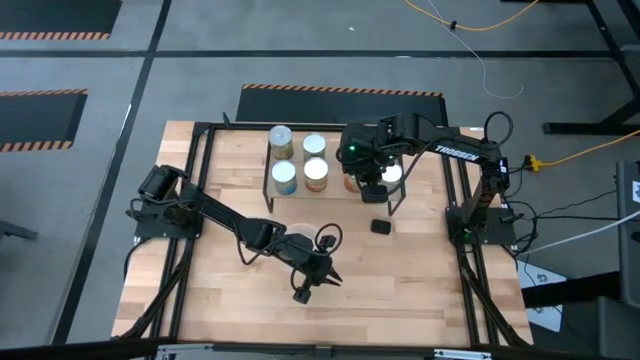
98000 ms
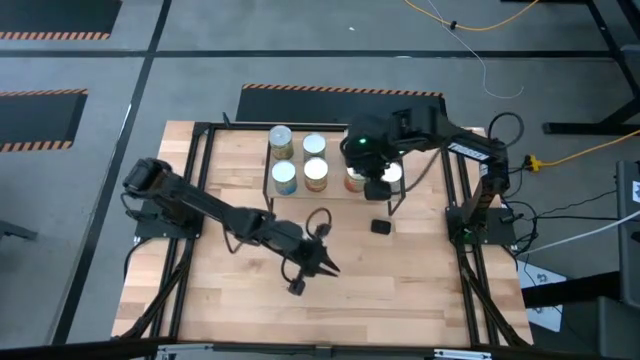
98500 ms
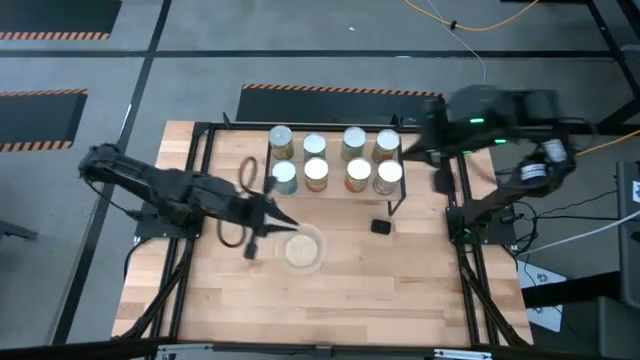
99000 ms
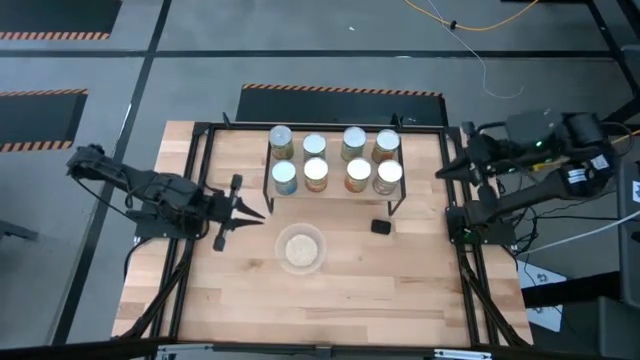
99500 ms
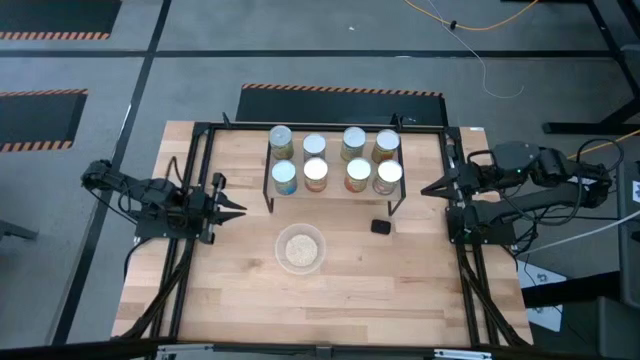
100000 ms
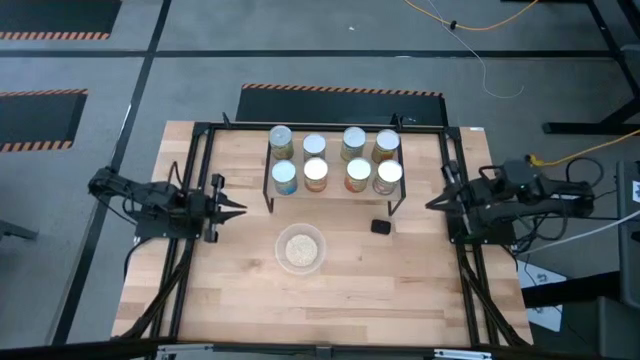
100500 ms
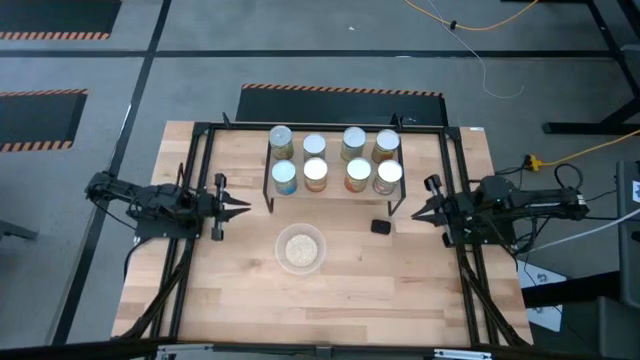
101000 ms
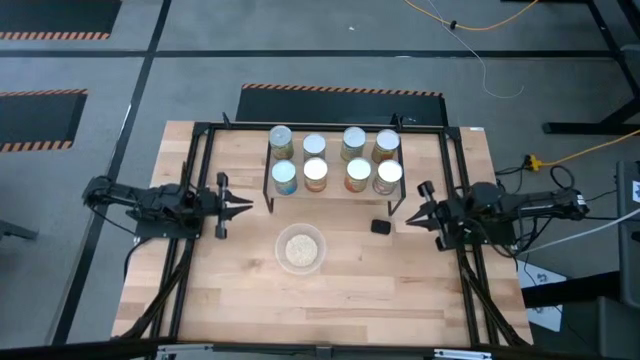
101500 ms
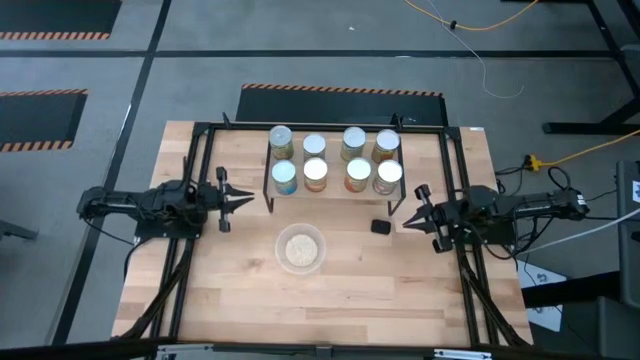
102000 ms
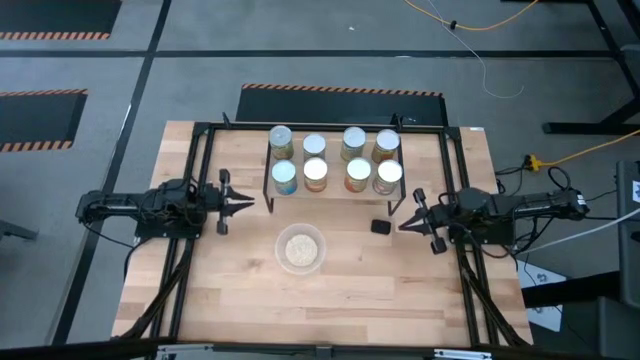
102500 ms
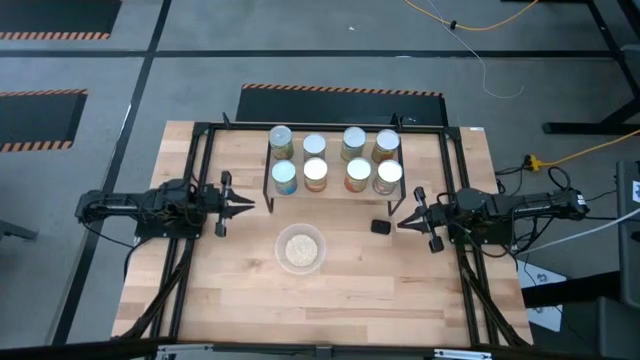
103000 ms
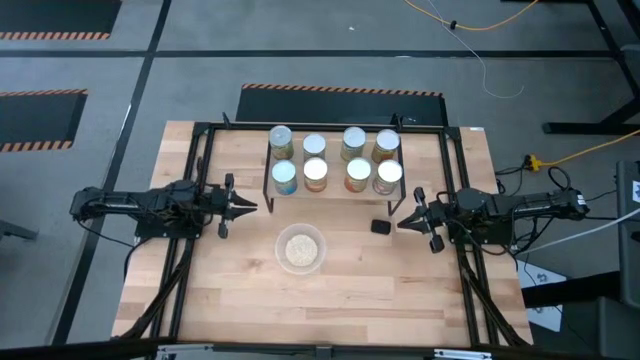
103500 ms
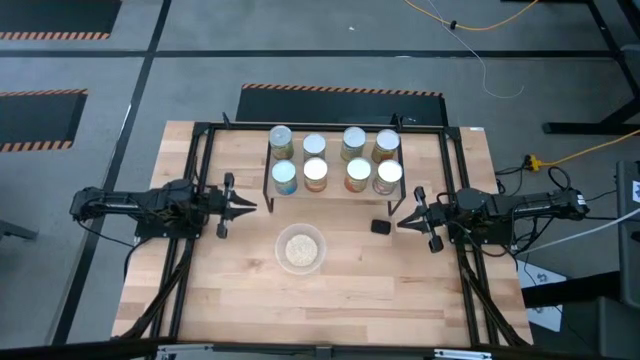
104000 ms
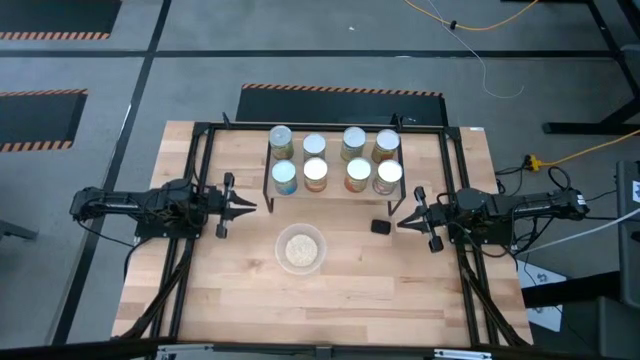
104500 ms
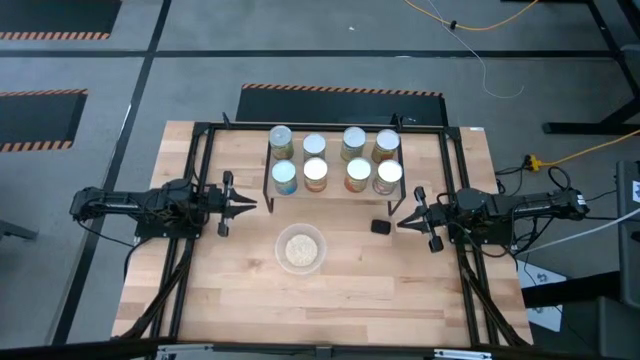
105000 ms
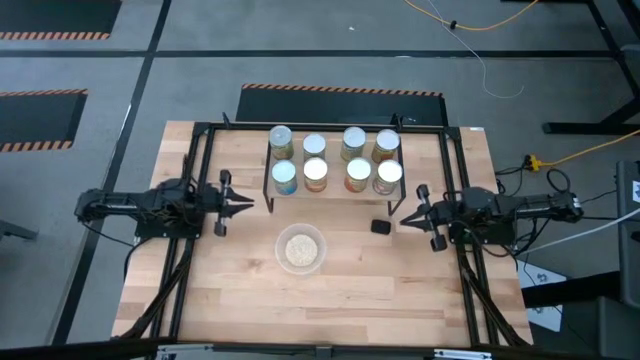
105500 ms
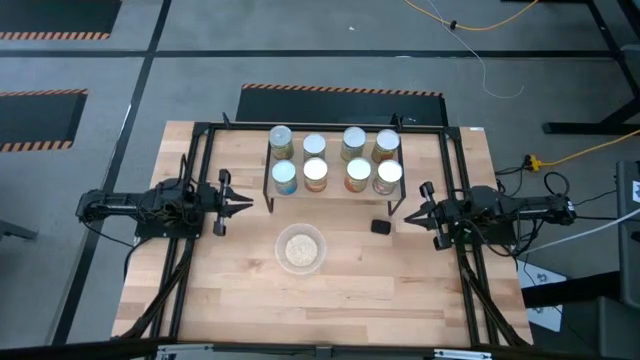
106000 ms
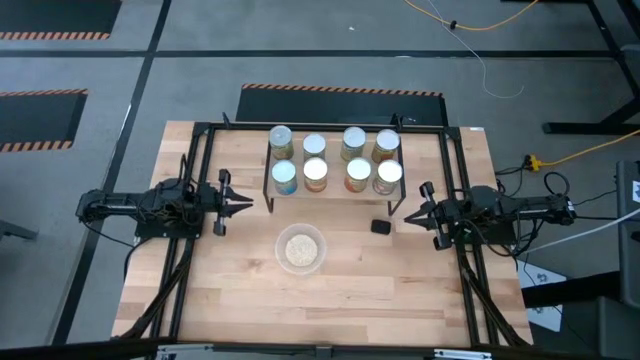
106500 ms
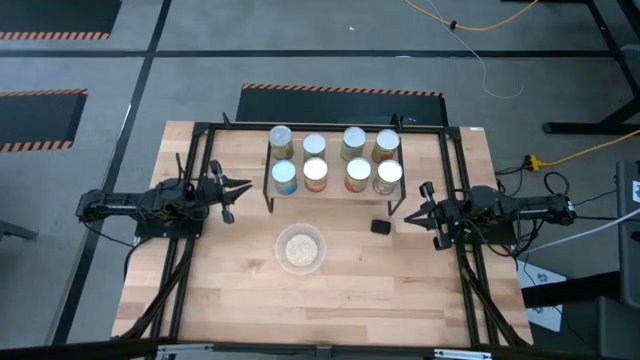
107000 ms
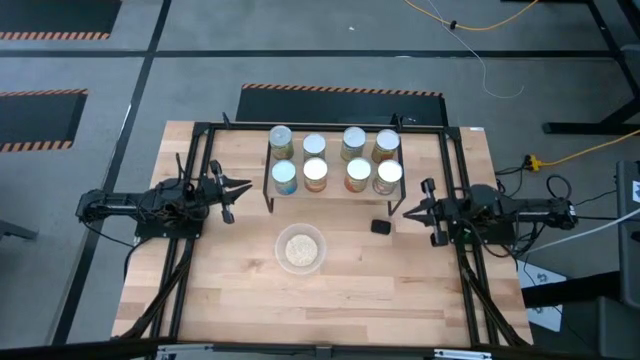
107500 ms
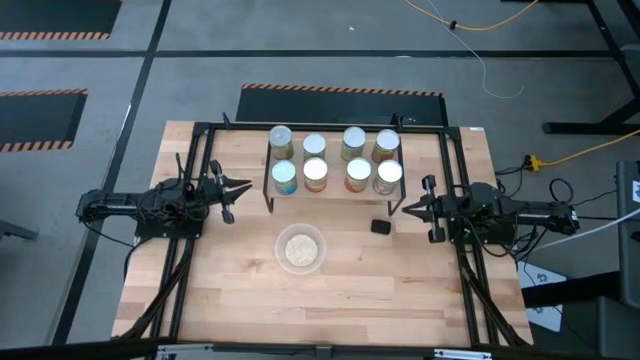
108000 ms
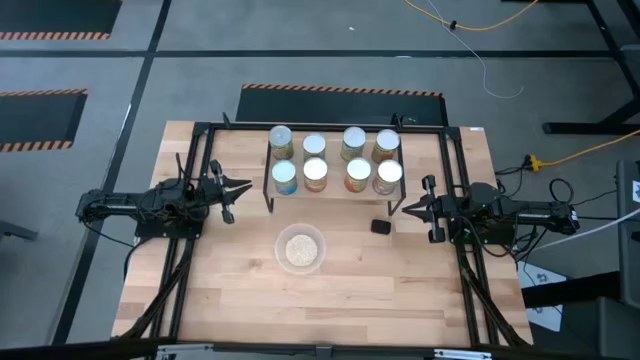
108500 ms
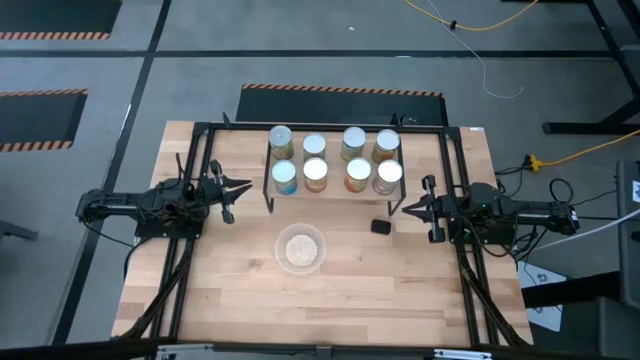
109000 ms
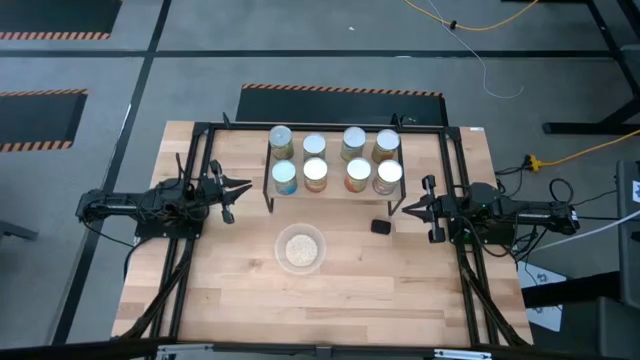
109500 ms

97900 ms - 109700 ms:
Task: Pick and place cans onto a shelf
Return to Home Position

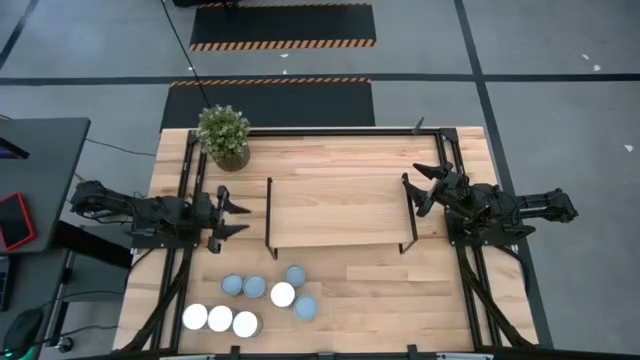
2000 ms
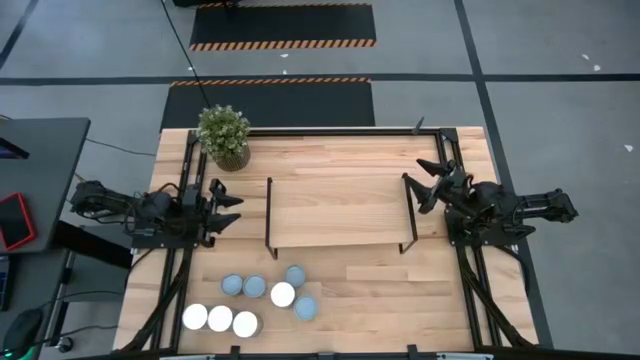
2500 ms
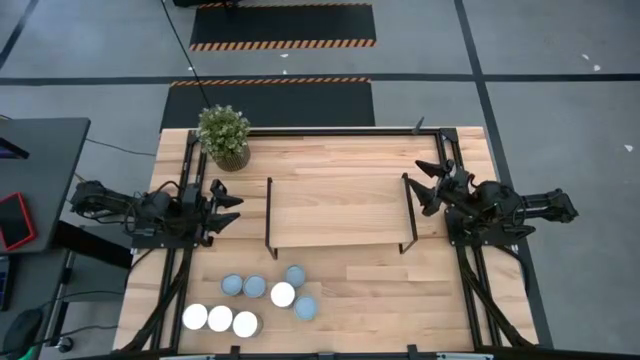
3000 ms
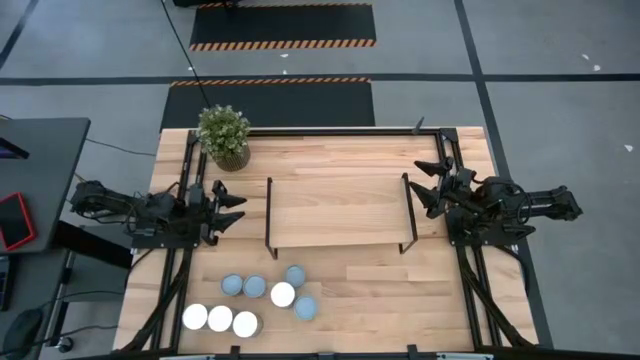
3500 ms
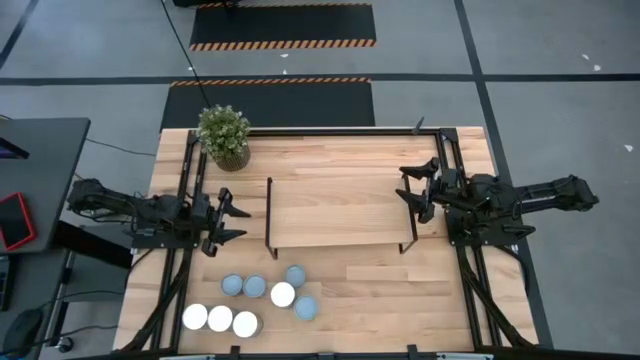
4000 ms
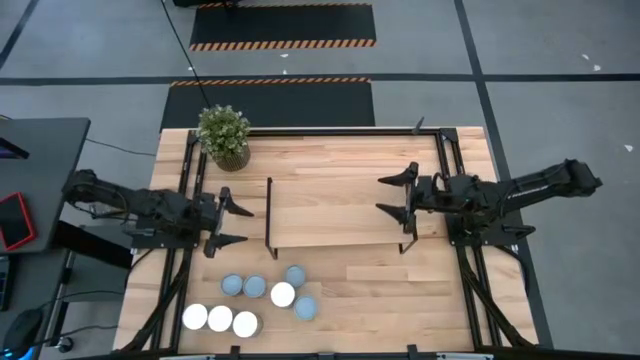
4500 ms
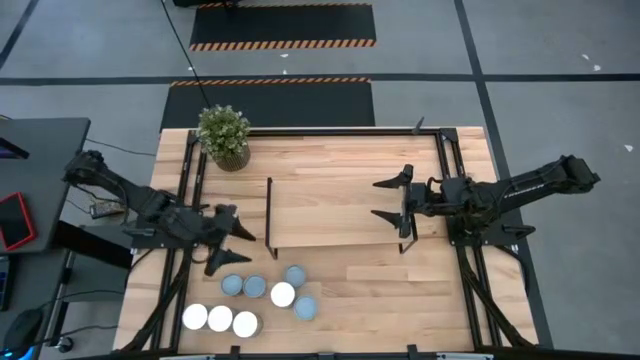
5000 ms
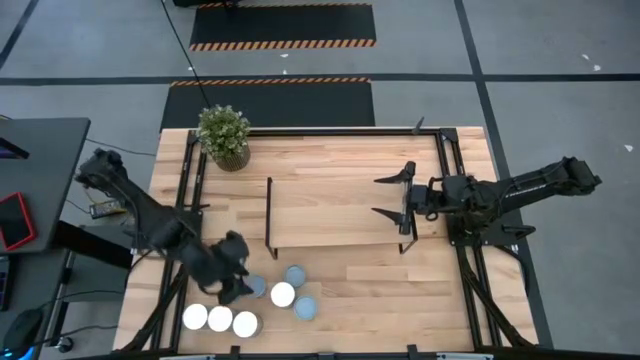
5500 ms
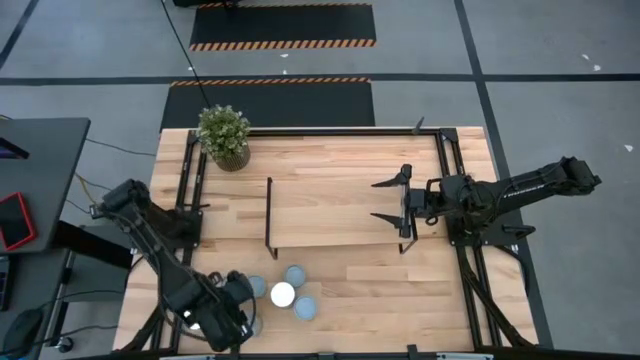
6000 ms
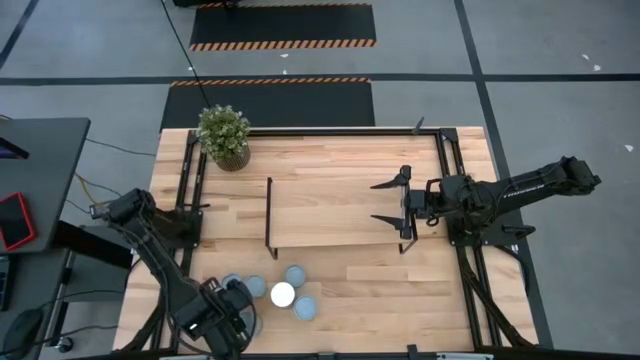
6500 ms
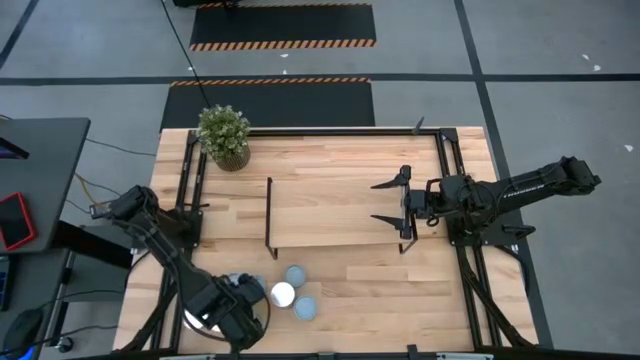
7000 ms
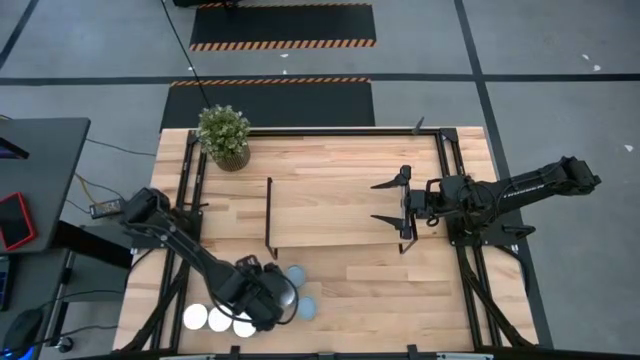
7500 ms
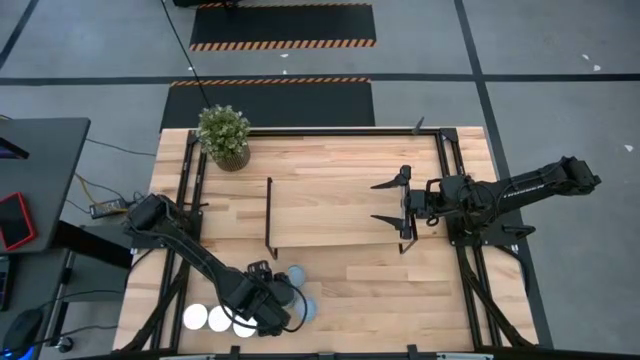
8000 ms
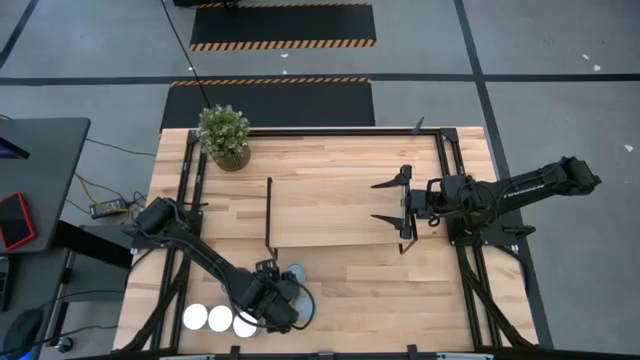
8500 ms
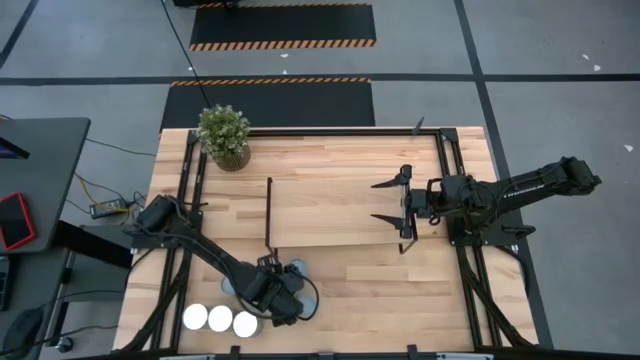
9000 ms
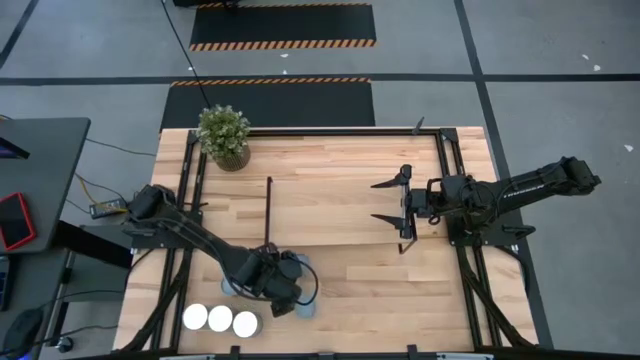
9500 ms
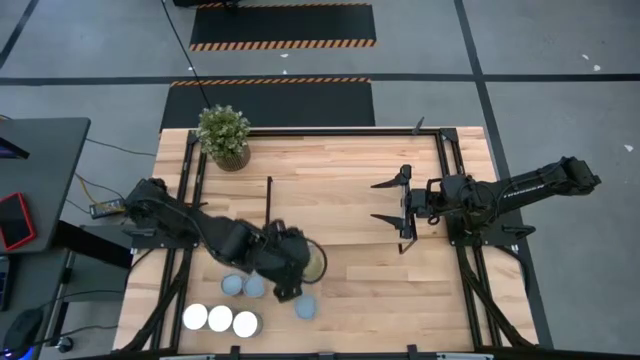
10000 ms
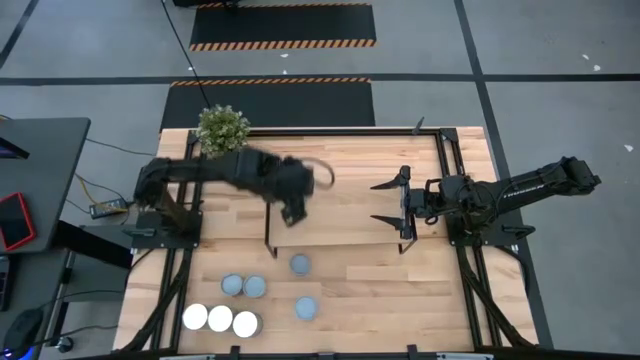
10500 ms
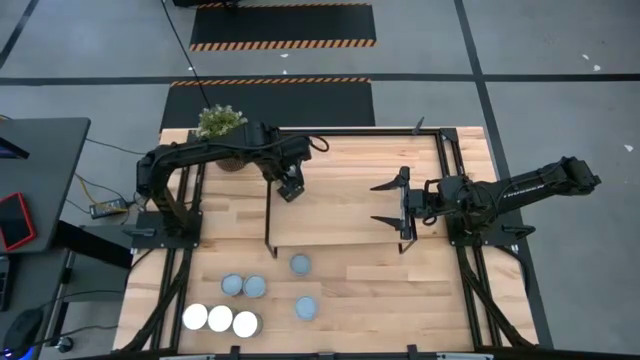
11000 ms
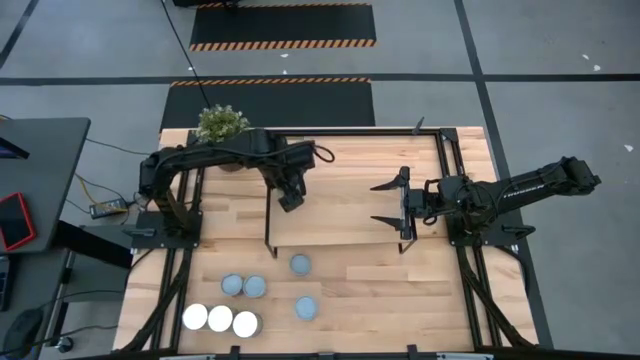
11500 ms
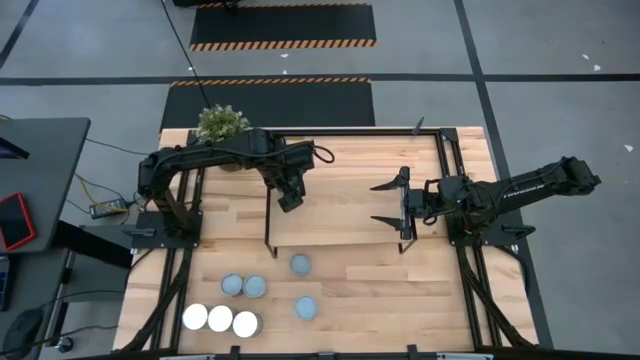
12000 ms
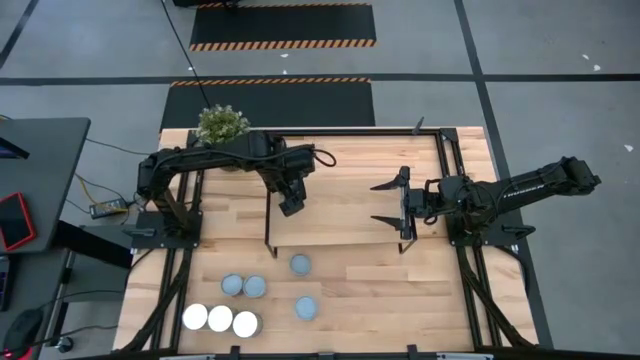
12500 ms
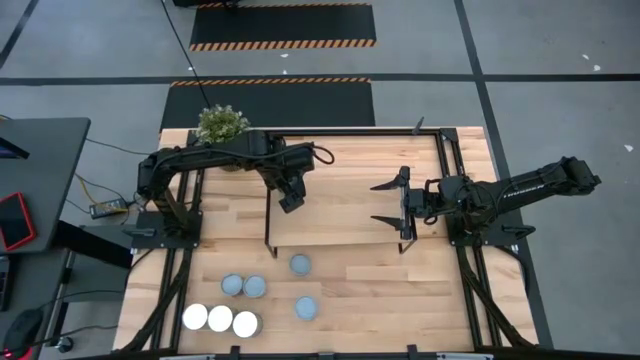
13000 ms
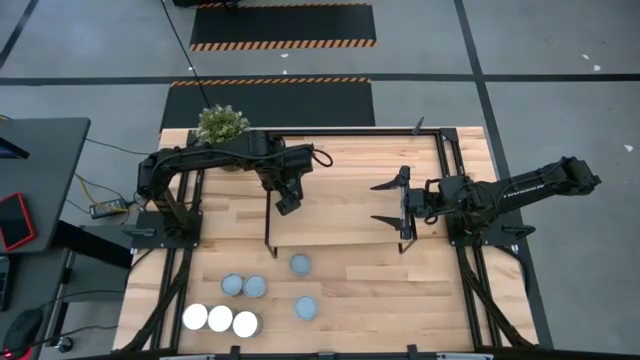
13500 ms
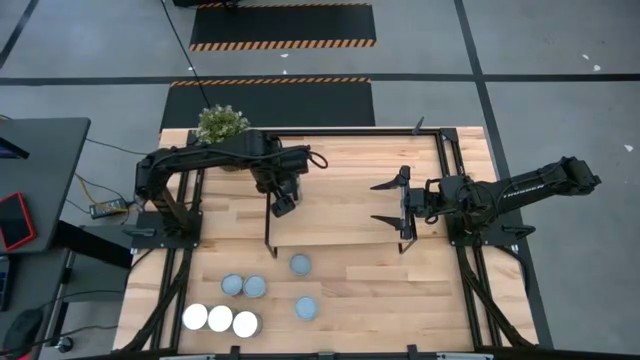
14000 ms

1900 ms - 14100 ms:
Task: Pick and place cans onto a shelf
Put the canned oranges on the shelf
